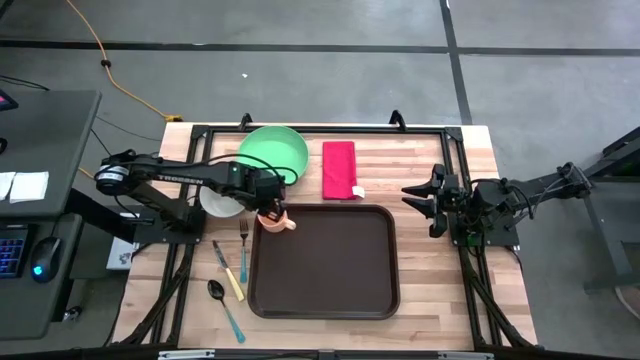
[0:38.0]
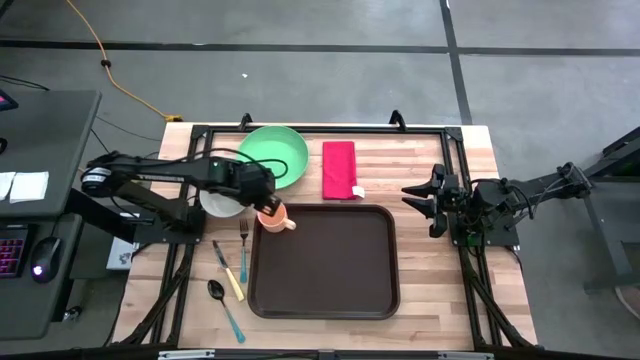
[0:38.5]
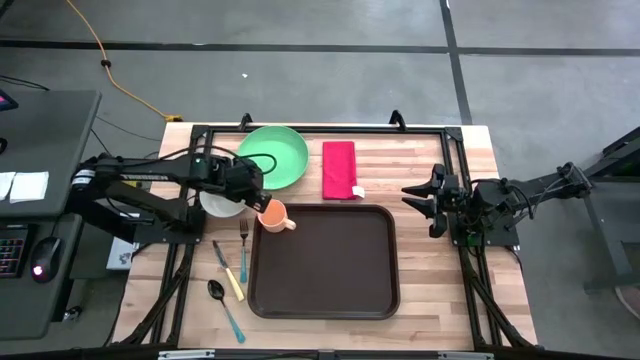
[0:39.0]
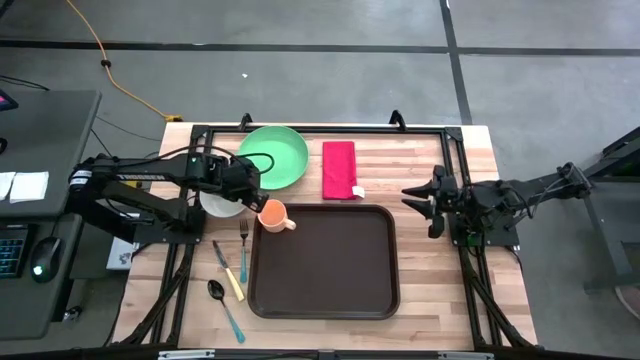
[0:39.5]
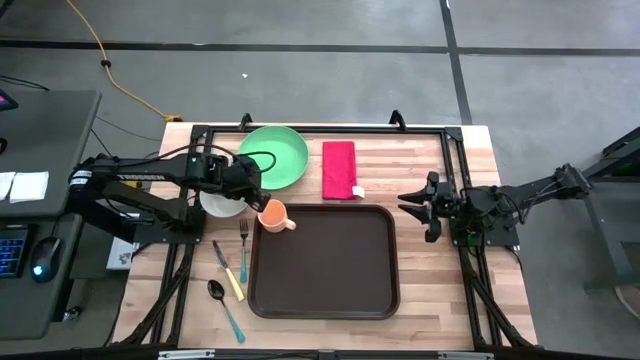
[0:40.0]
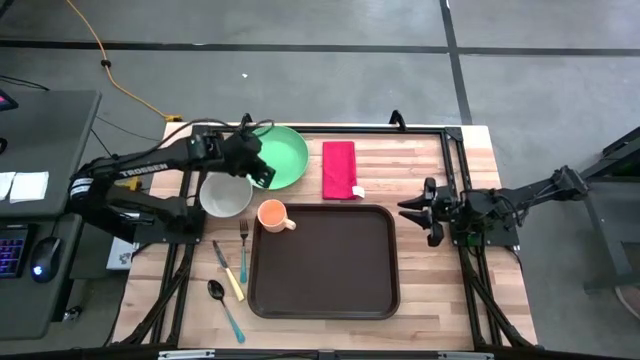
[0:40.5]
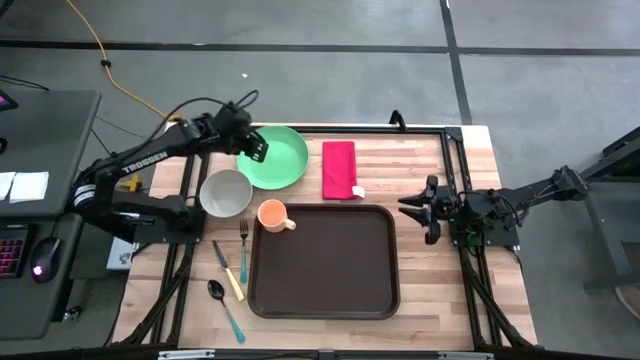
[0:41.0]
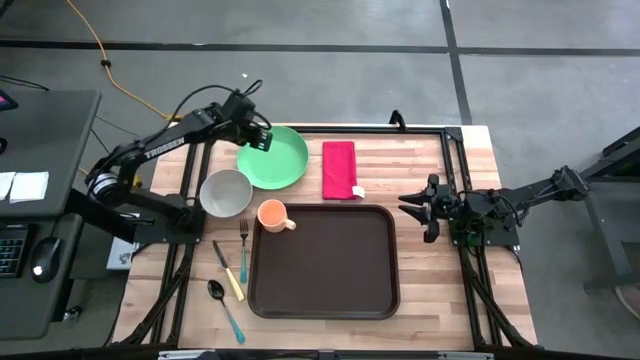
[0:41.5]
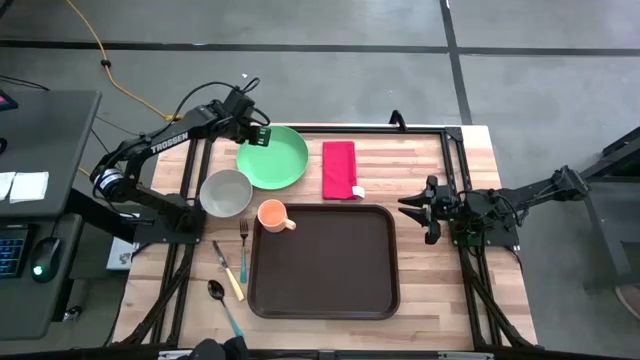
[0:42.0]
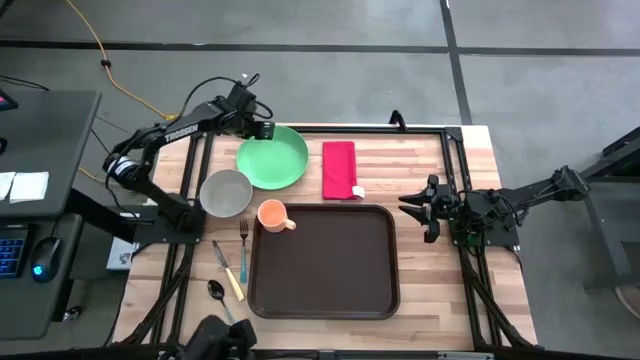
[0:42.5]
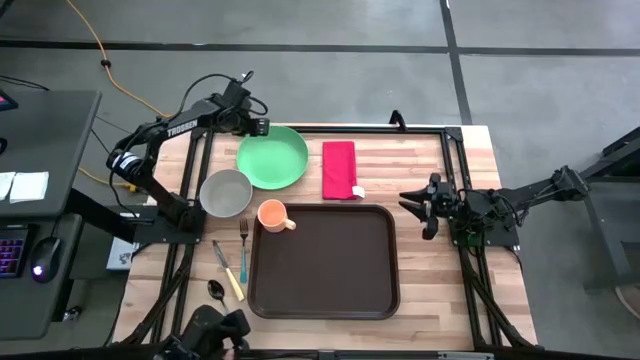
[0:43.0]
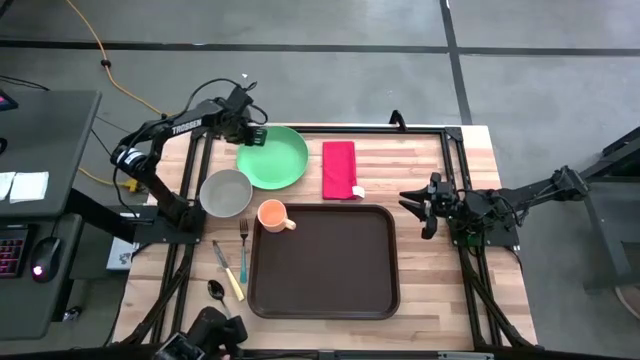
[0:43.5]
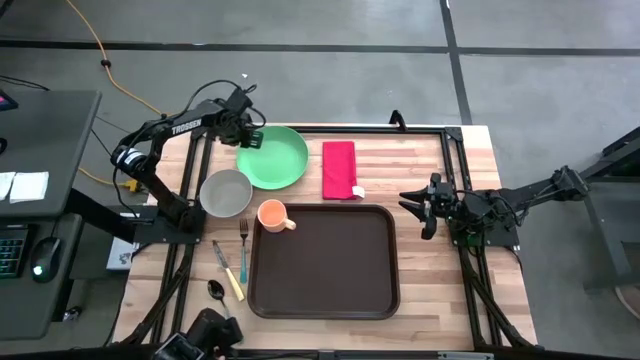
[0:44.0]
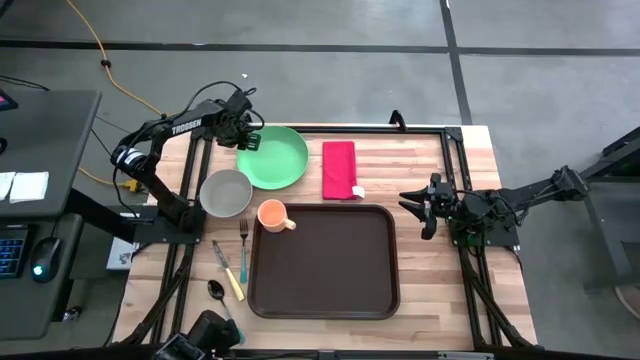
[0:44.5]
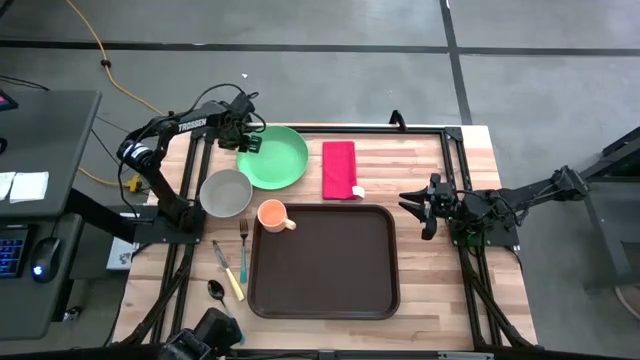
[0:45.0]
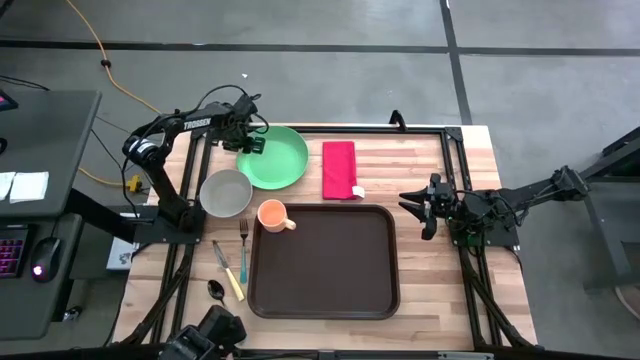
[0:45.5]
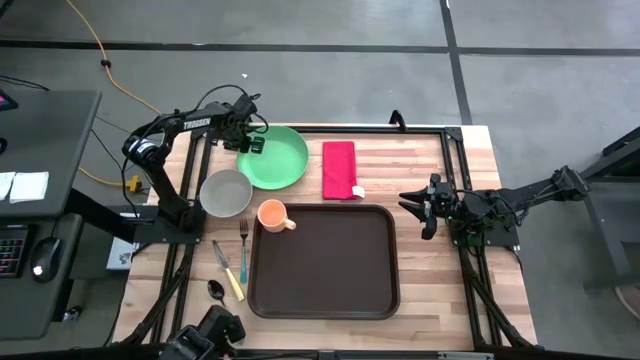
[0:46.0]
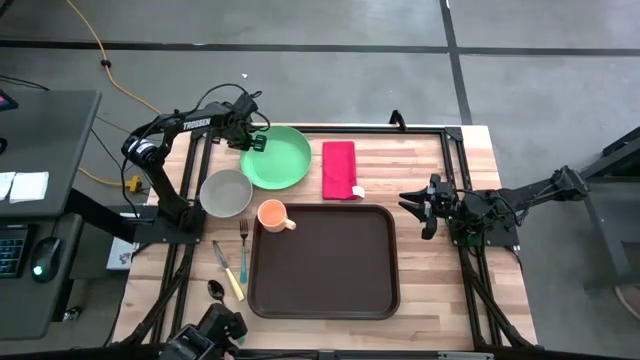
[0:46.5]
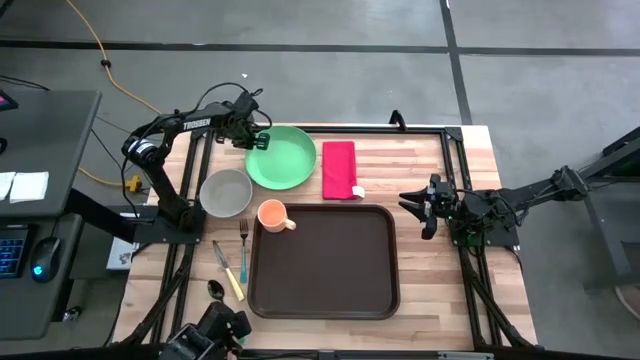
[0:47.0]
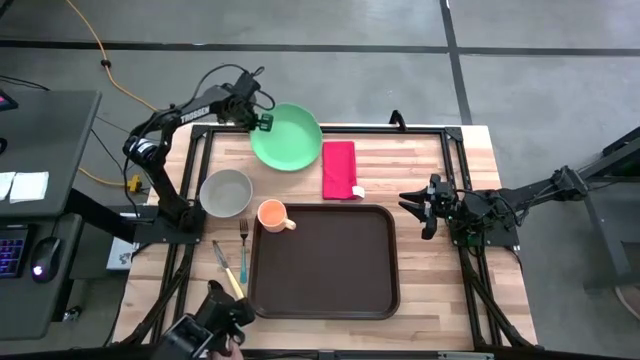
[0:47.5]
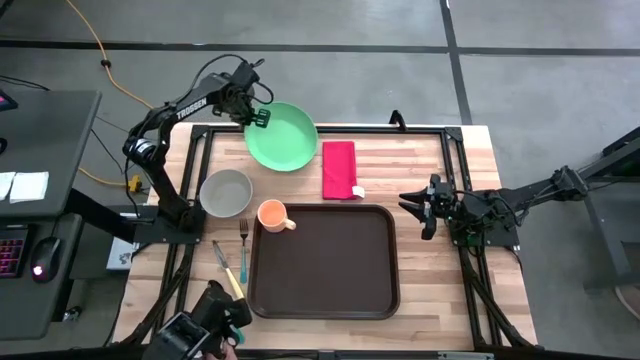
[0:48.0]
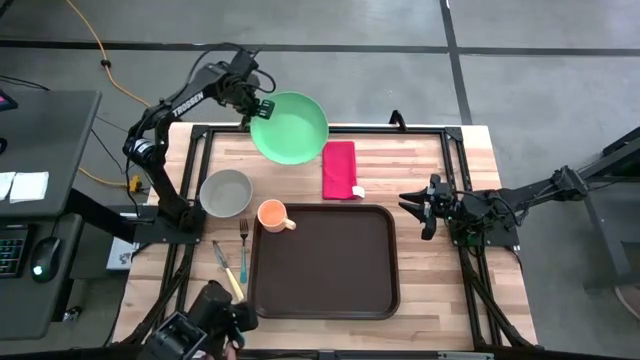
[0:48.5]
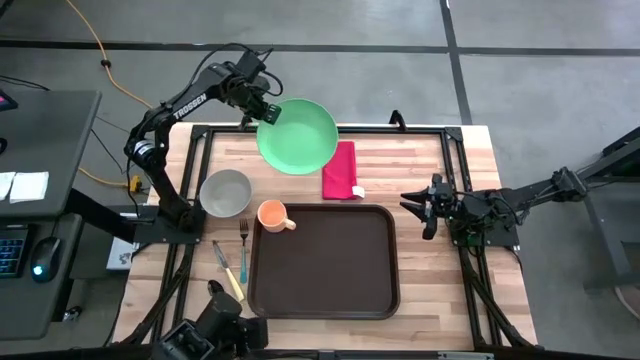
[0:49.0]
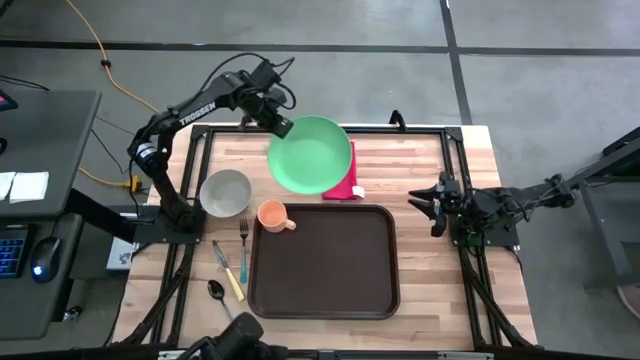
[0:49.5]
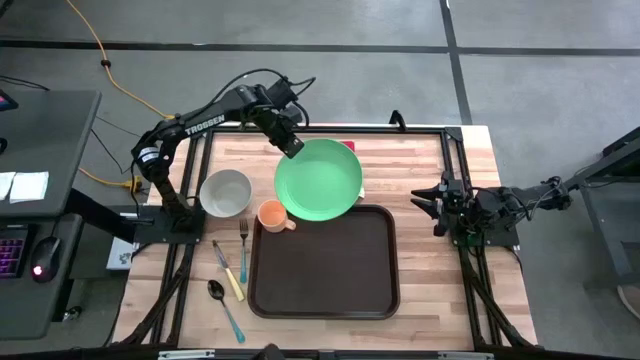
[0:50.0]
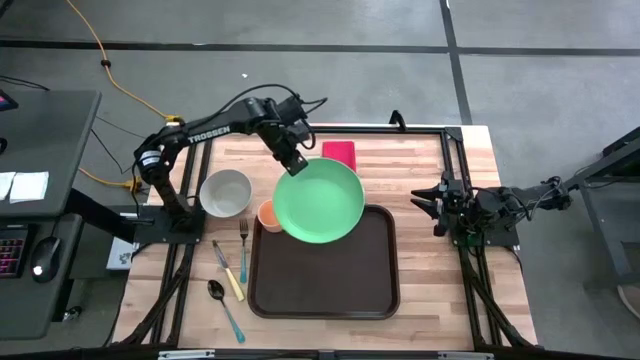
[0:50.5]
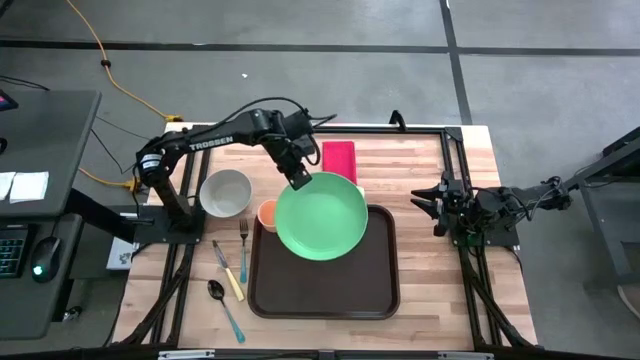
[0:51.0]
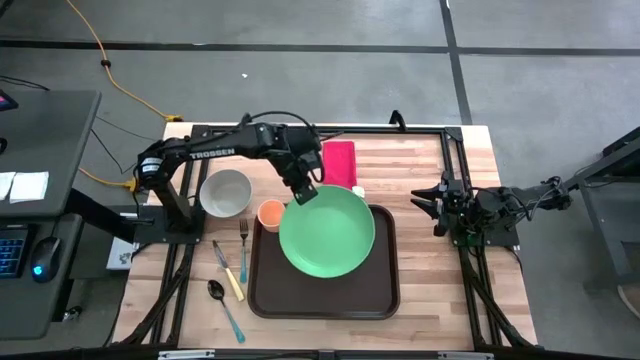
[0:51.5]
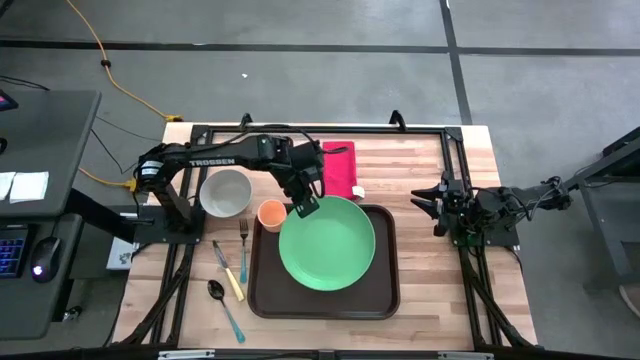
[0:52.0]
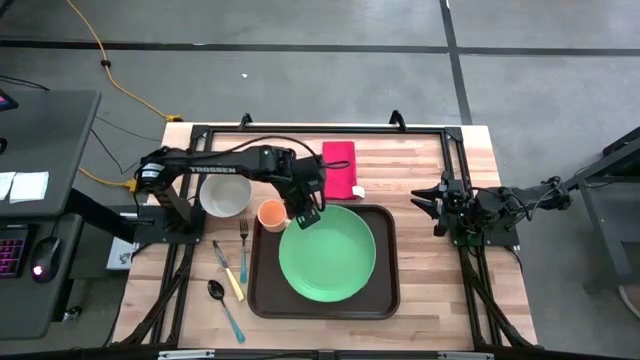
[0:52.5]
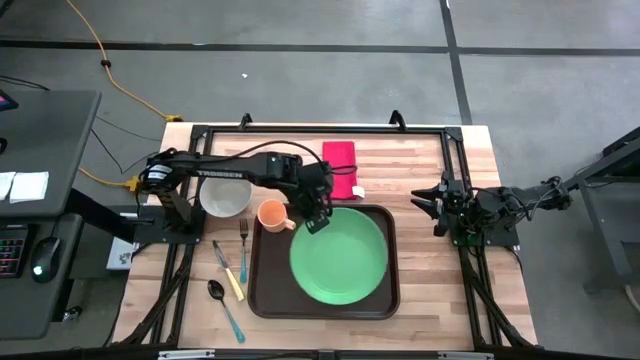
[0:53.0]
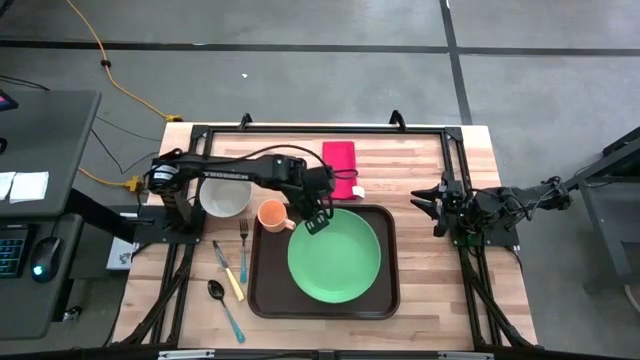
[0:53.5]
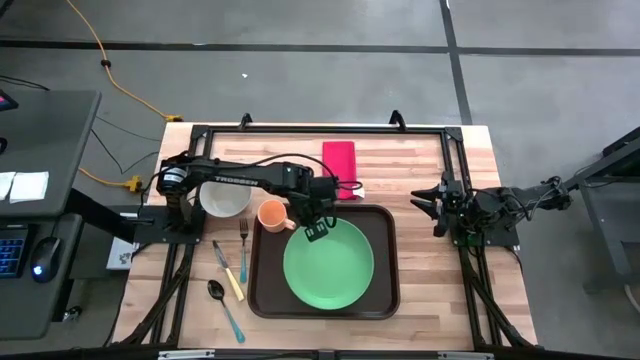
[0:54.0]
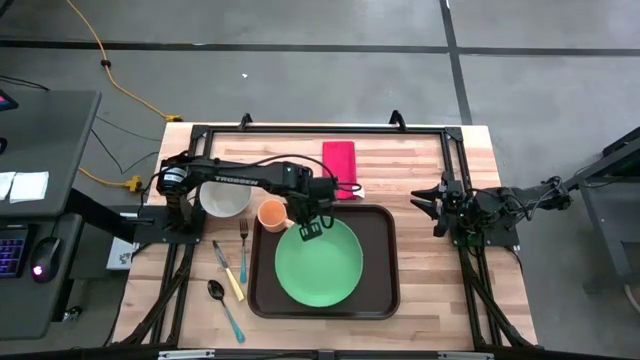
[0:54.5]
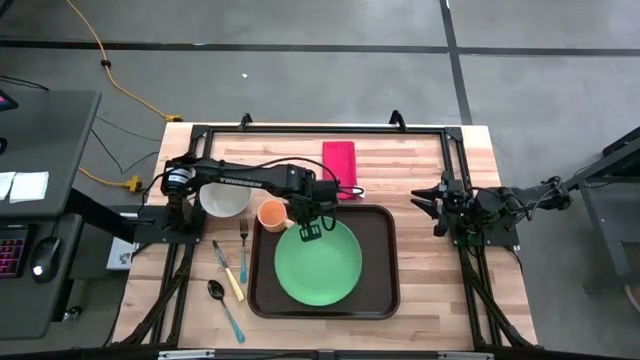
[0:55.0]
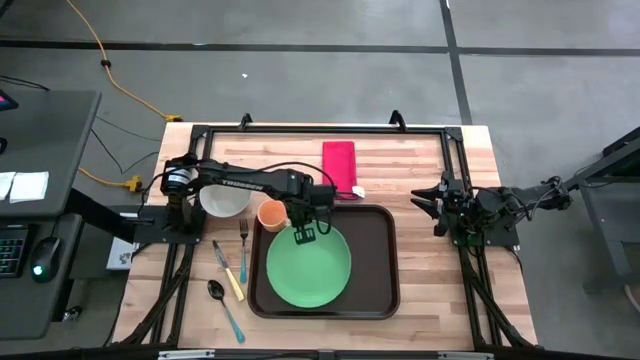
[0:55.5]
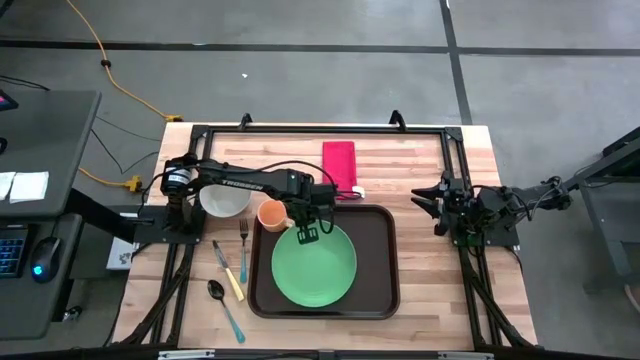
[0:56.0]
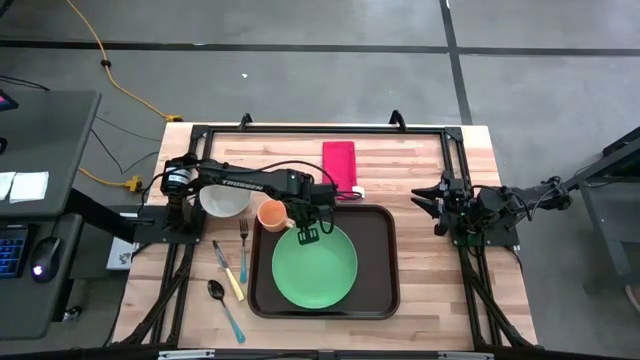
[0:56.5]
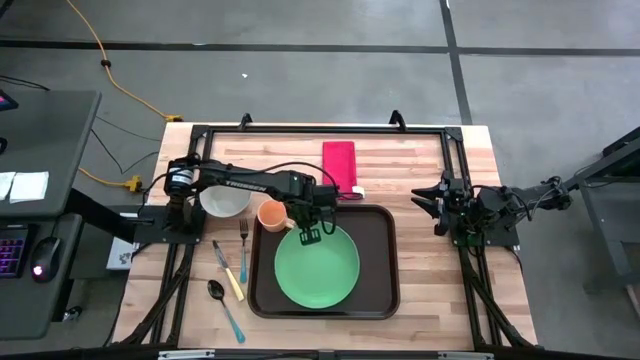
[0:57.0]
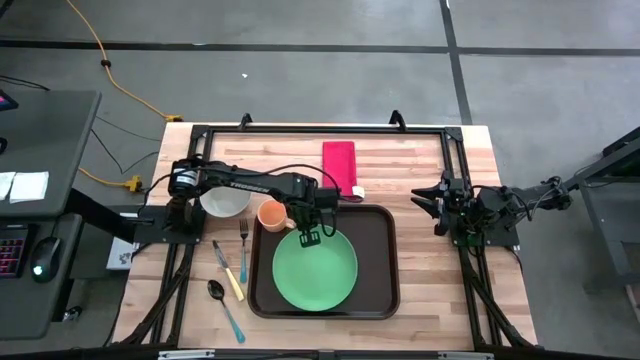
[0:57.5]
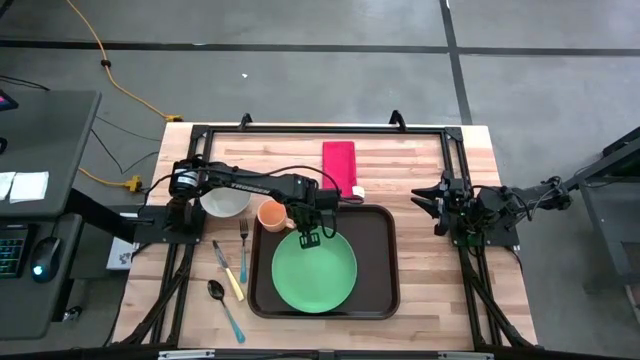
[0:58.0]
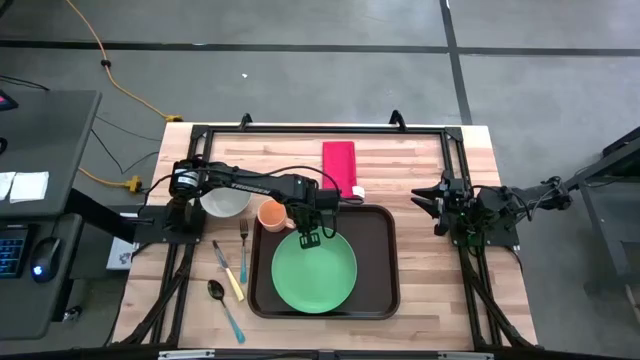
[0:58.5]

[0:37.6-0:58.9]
Task: Set up tray
Put the green plate on the black serving tray to the bottom right of the orange mug
